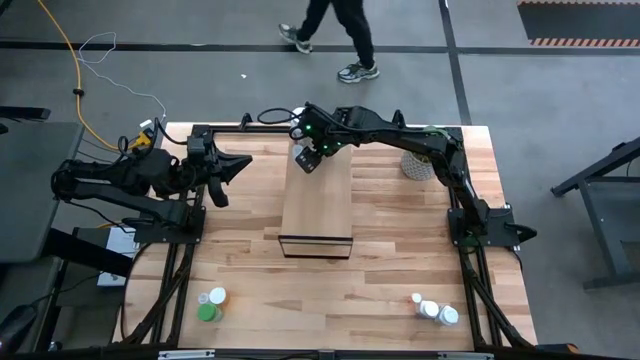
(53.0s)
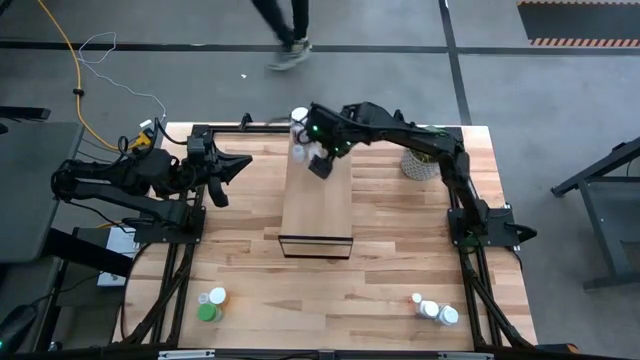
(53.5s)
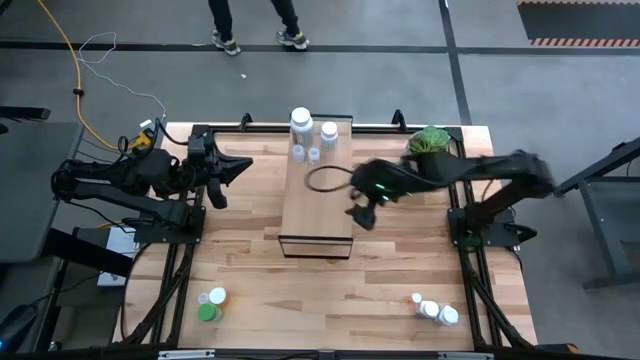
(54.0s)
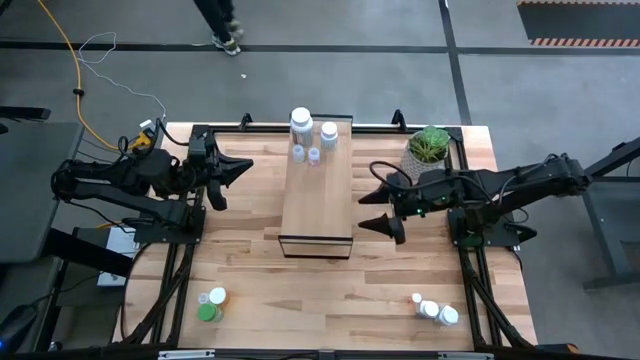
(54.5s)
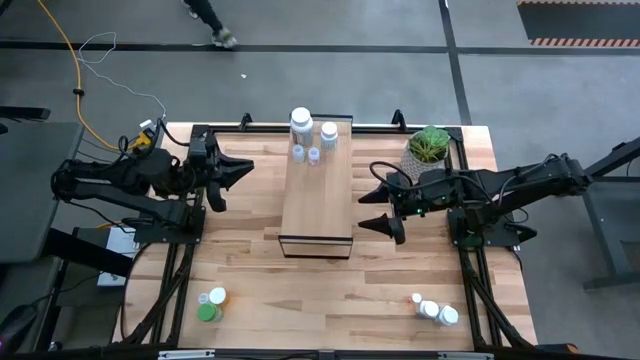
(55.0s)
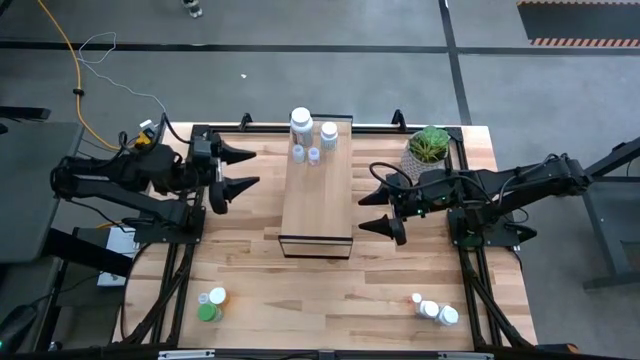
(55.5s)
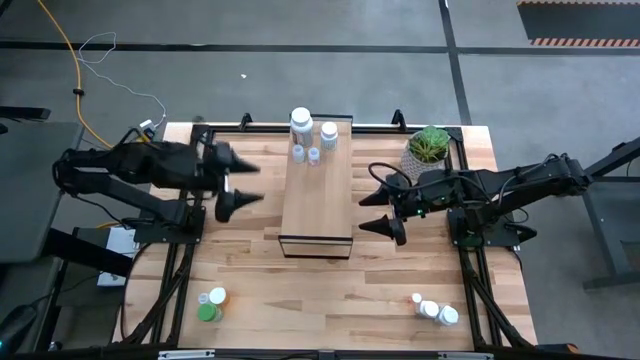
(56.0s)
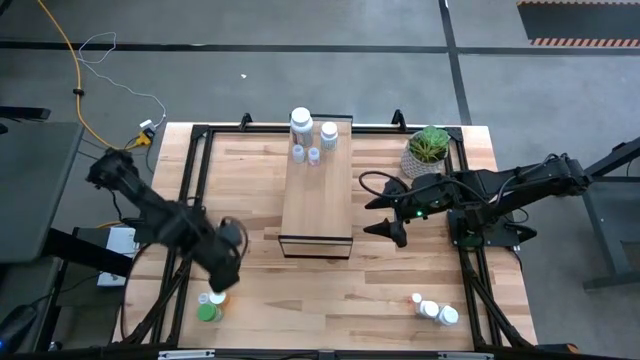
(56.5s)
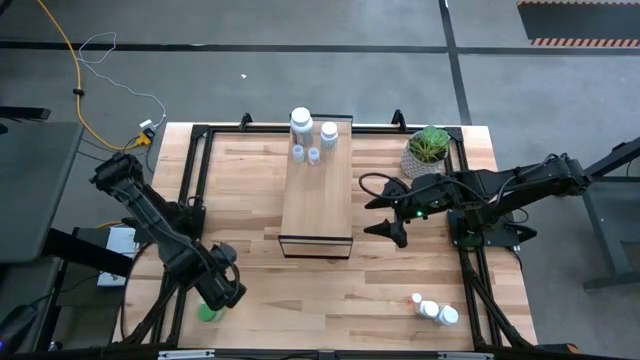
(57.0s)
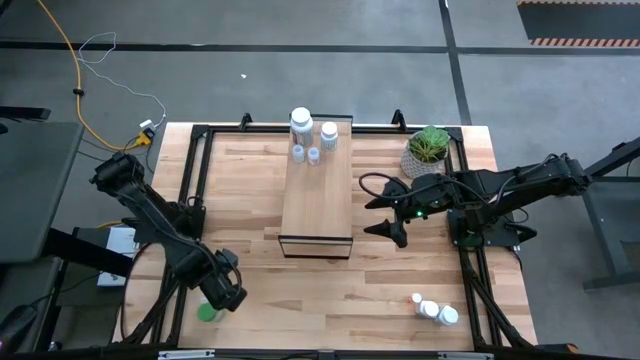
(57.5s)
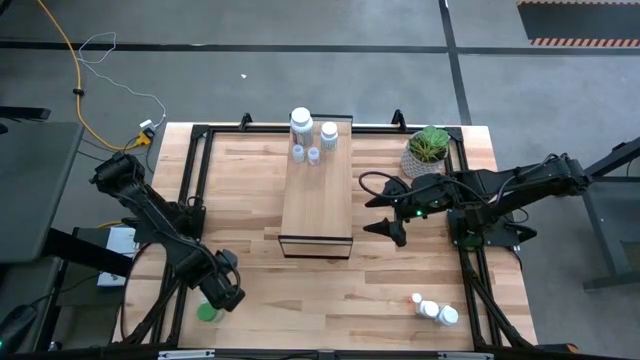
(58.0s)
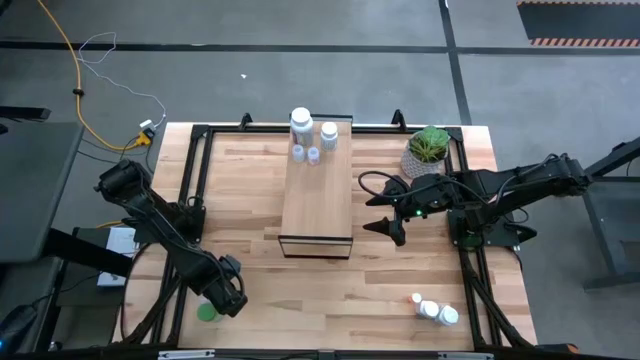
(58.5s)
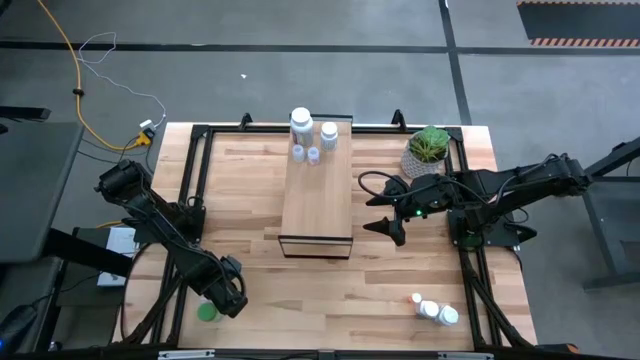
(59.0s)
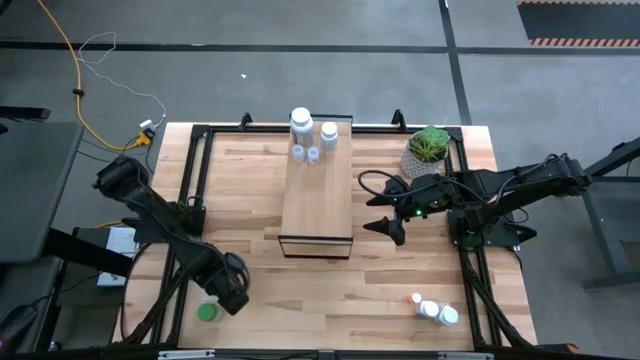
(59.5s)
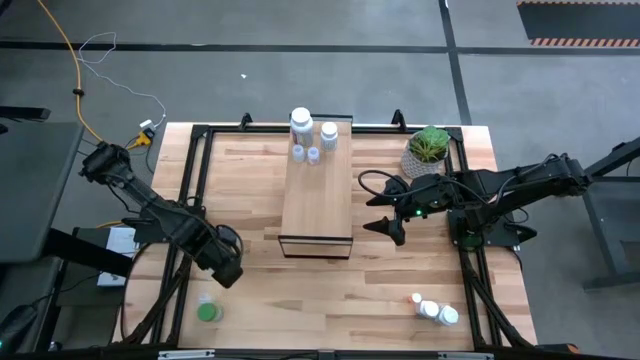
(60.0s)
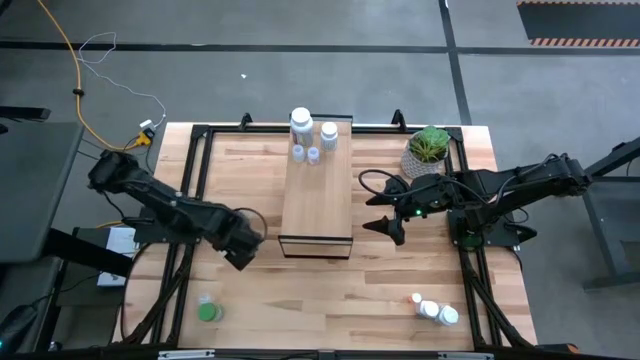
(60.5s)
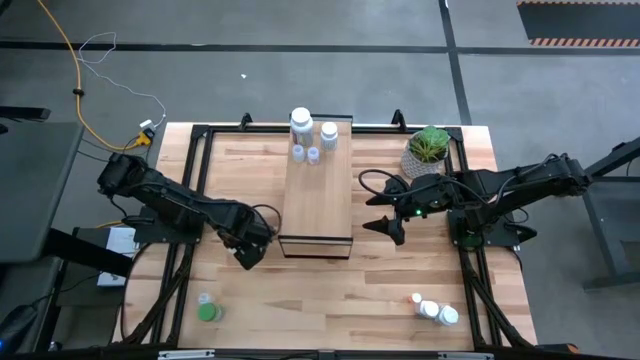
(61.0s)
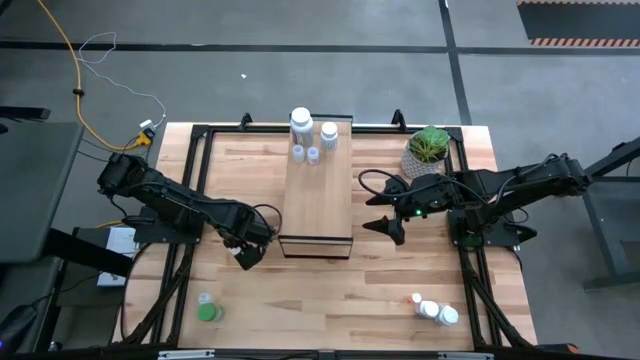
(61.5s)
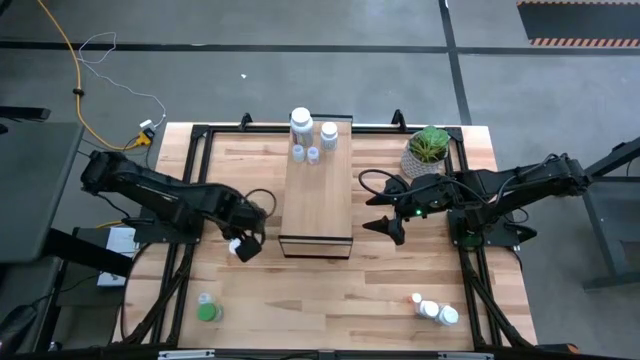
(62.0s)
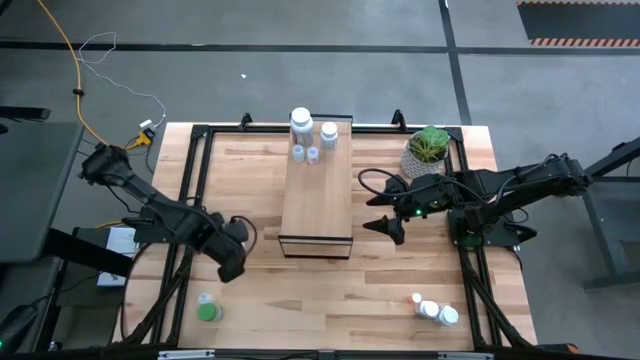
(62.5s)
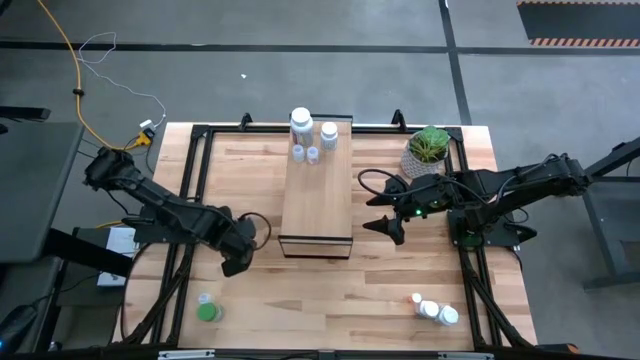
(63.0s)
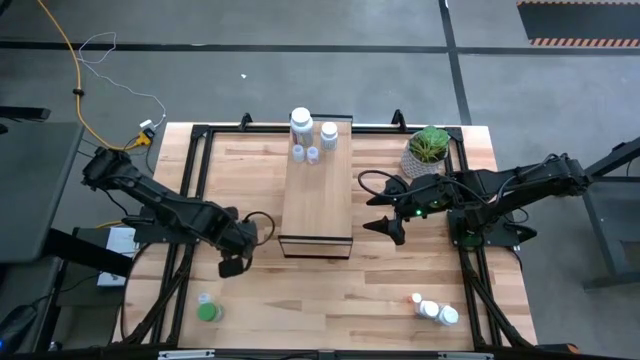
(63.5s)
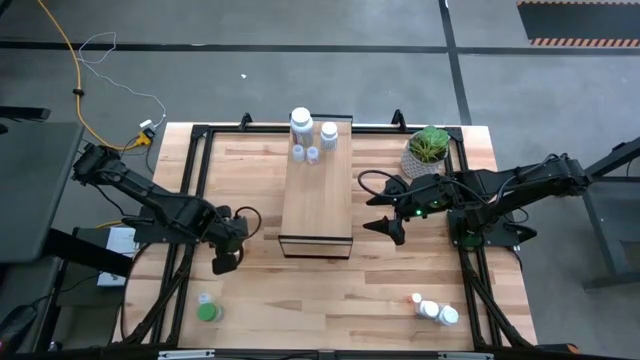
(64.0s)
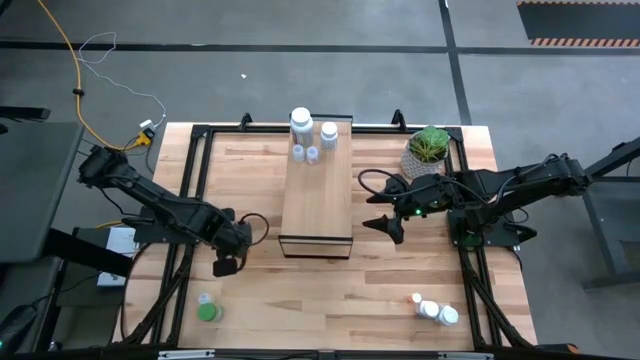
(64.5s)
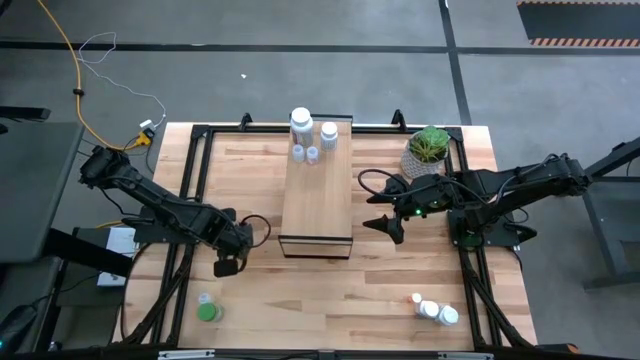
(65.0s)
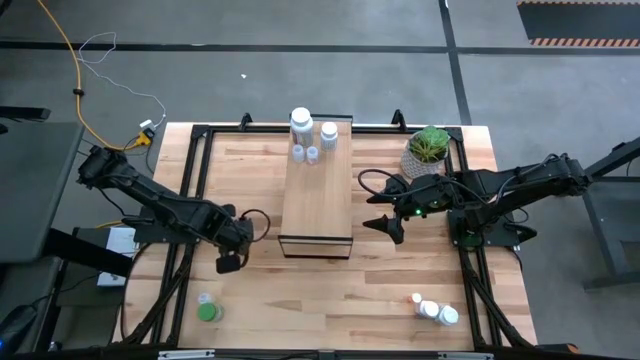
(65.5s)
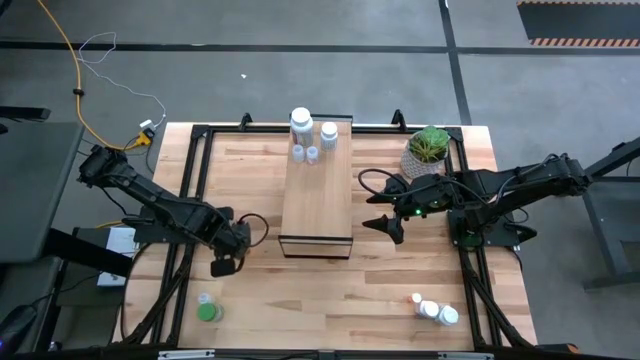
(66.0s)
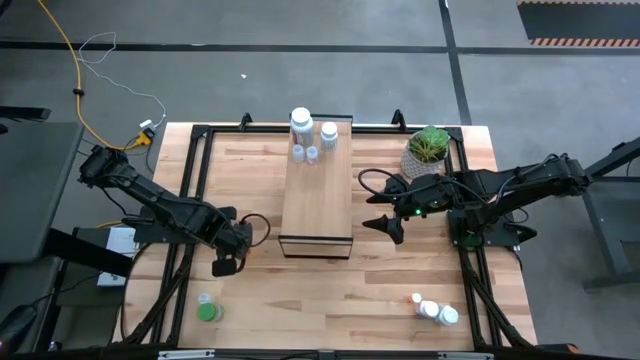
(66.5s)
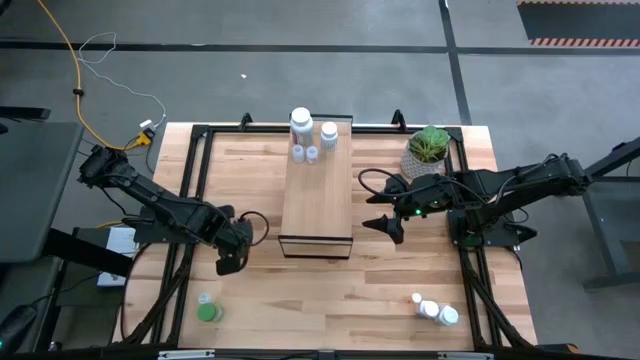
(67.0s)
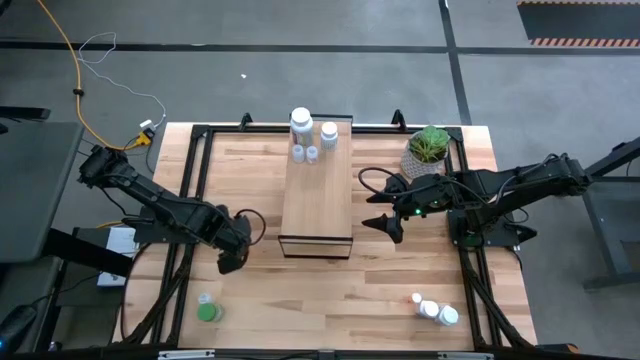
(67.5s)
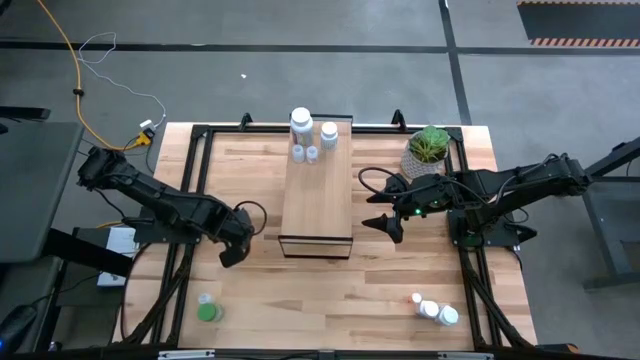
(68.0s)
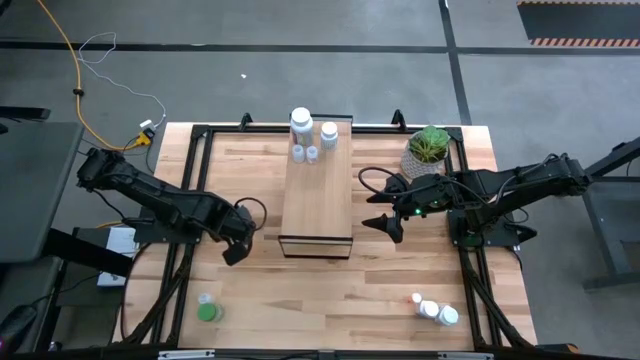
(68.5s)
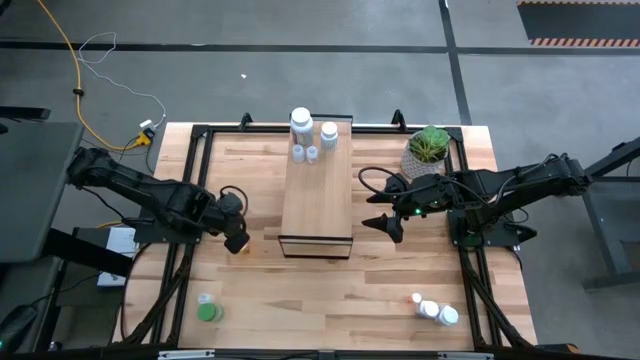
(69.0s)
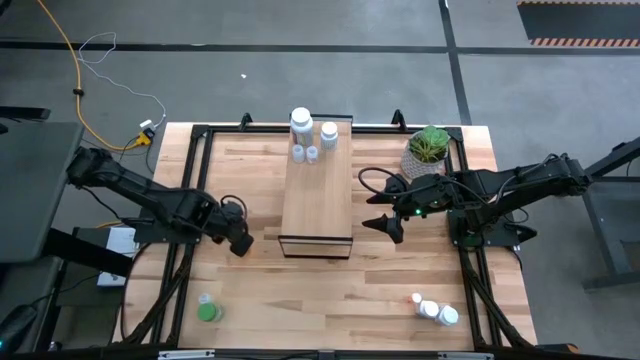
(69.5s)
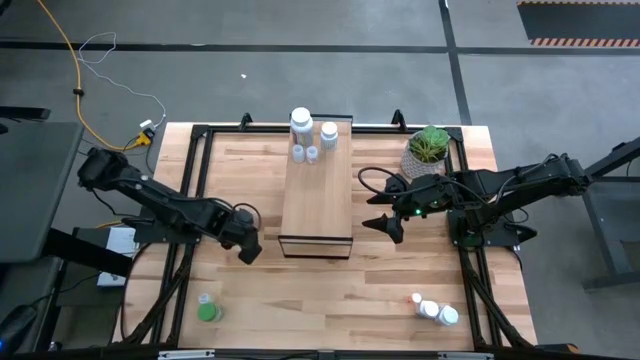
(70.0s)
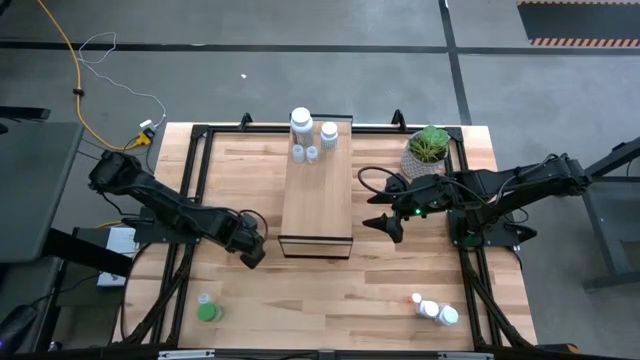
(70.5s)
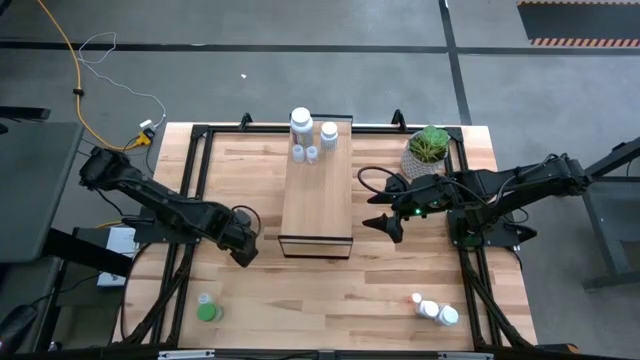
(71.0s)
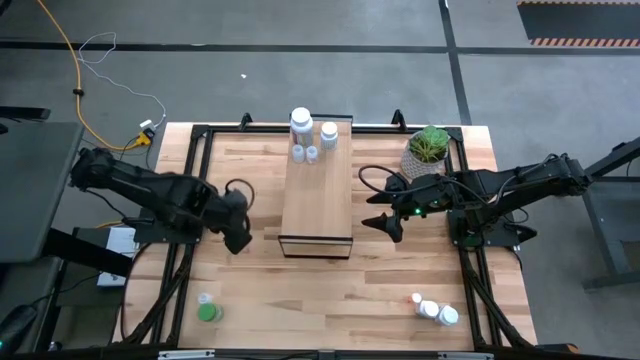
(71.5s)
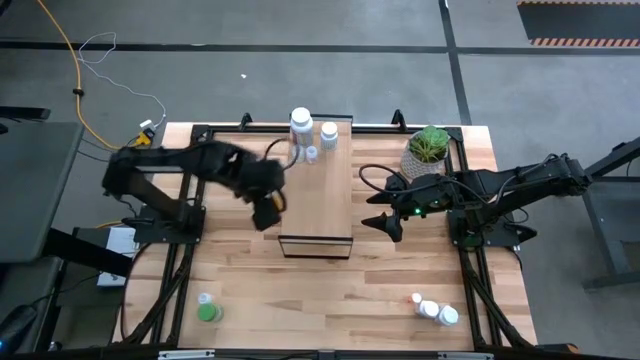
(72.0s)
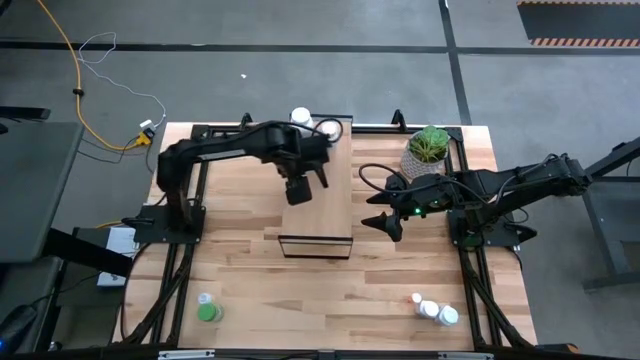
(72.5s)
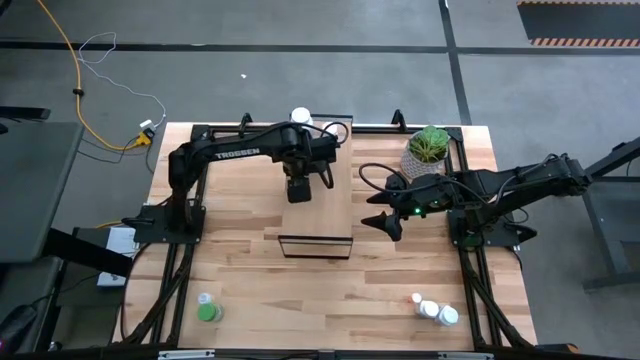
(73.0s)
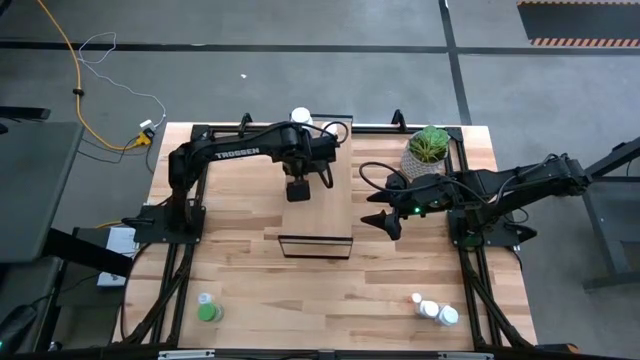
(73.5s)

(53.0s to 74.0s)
Task: Pick and place medicine bottles onto shelf by color
Put the orange medicine bottle on the shelf
